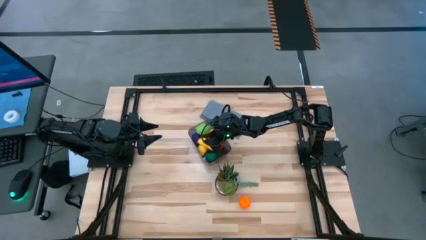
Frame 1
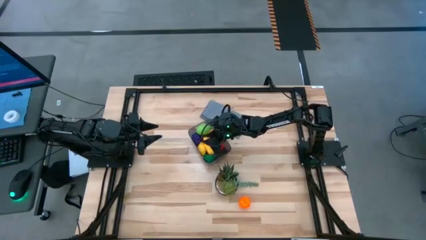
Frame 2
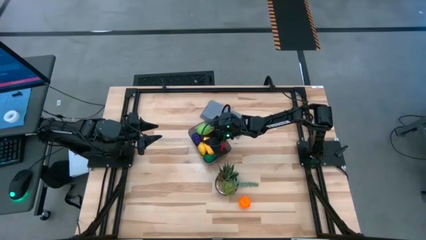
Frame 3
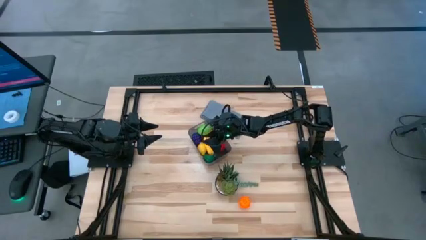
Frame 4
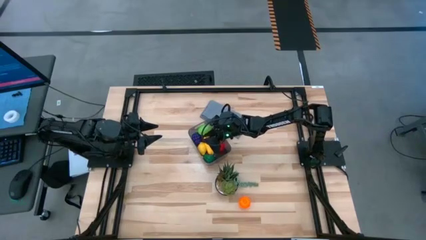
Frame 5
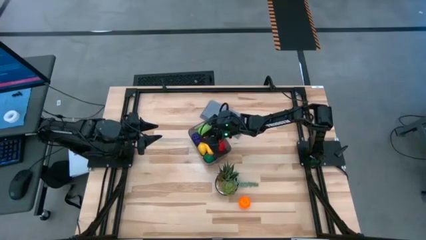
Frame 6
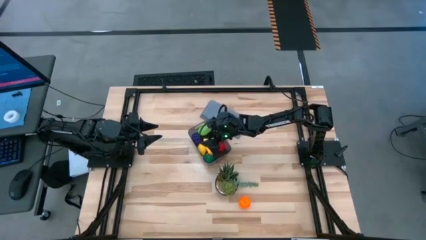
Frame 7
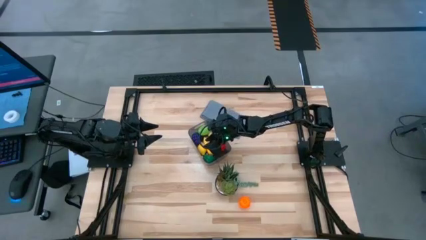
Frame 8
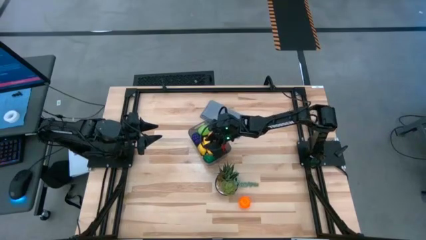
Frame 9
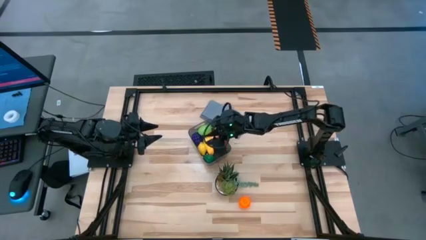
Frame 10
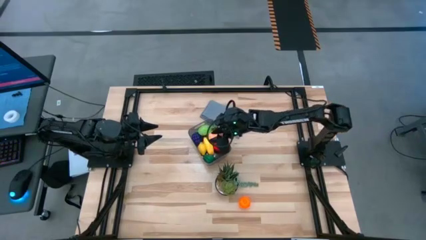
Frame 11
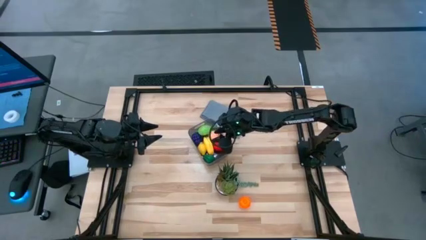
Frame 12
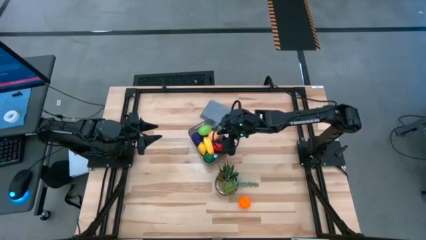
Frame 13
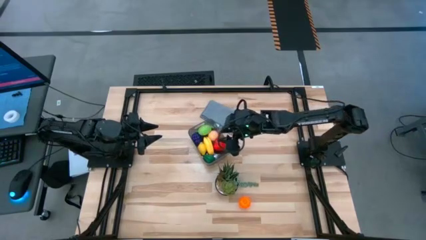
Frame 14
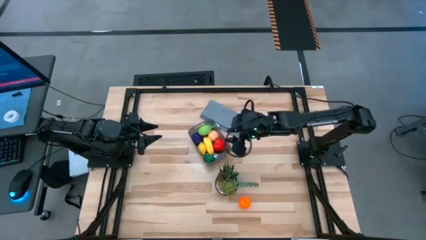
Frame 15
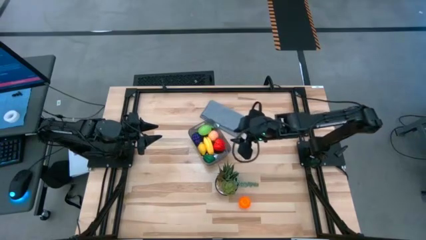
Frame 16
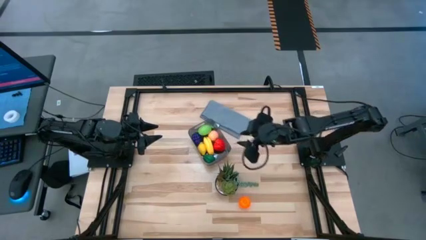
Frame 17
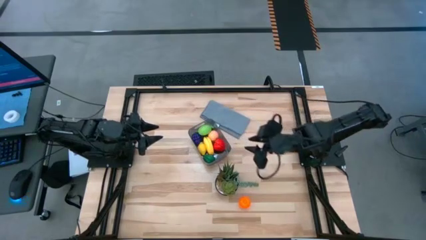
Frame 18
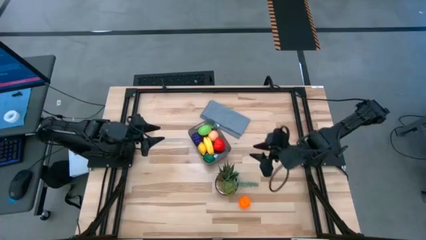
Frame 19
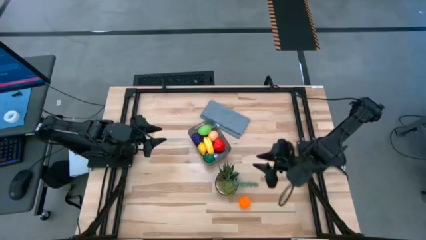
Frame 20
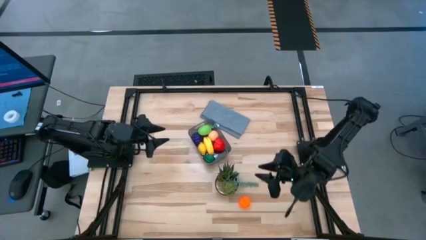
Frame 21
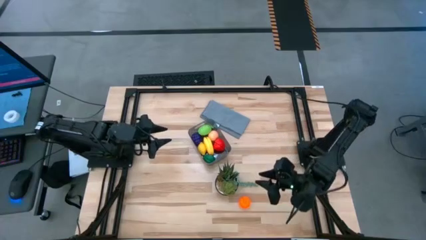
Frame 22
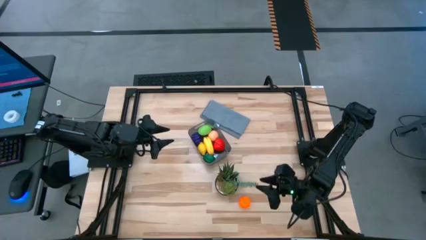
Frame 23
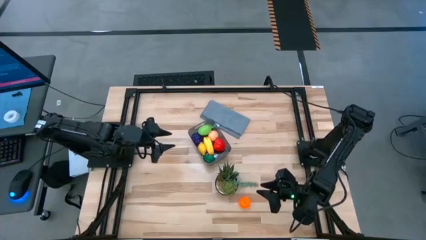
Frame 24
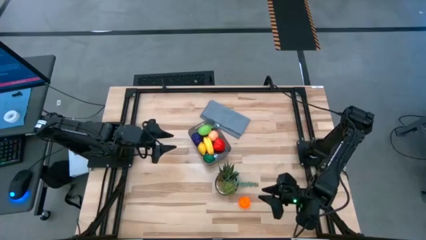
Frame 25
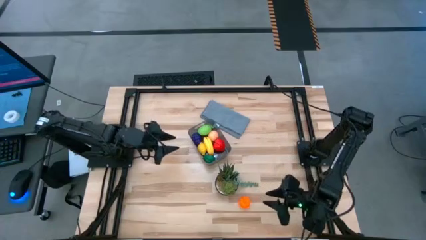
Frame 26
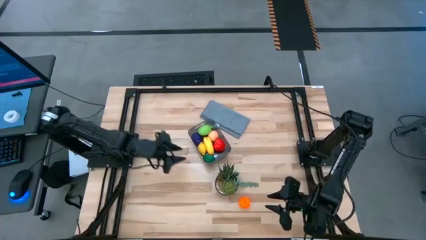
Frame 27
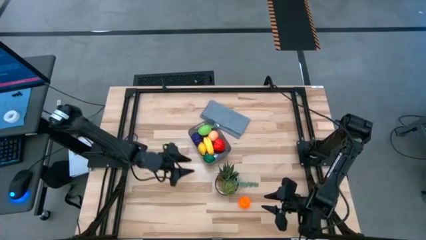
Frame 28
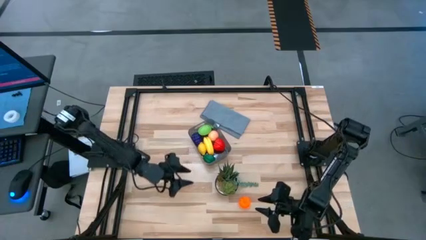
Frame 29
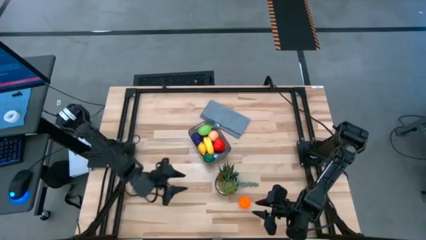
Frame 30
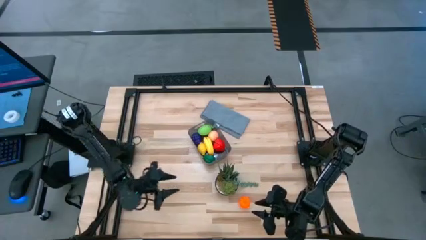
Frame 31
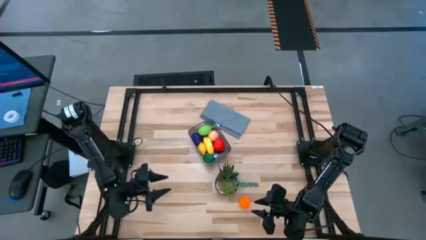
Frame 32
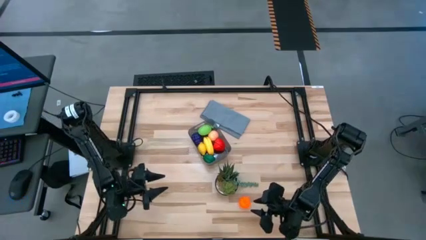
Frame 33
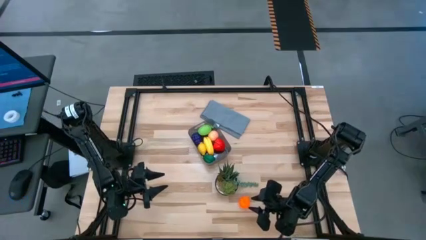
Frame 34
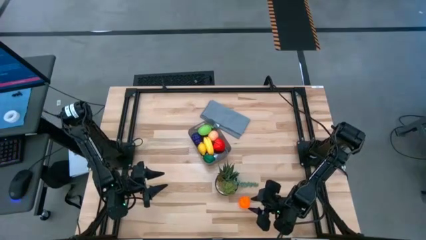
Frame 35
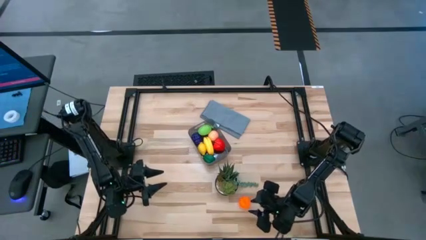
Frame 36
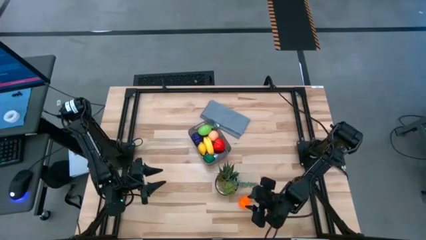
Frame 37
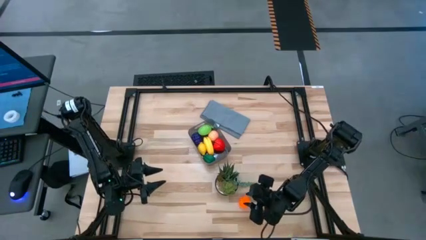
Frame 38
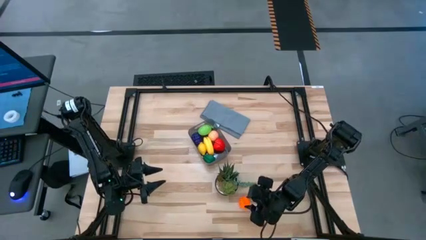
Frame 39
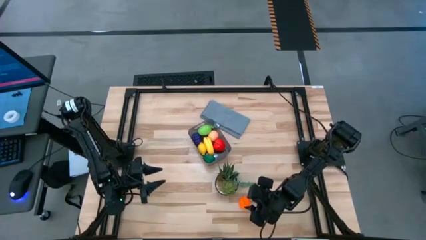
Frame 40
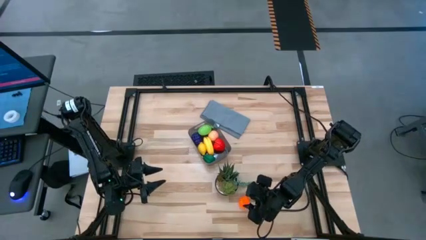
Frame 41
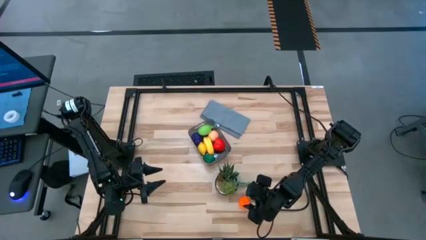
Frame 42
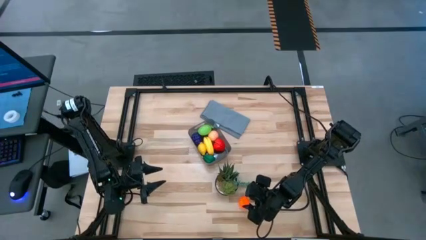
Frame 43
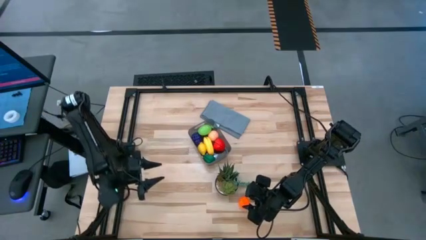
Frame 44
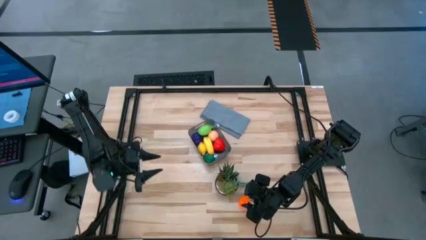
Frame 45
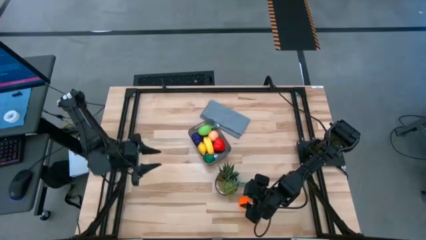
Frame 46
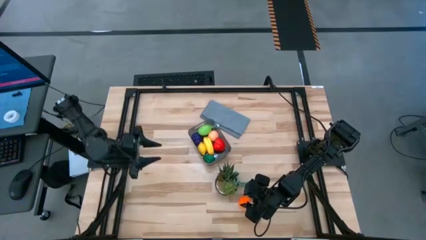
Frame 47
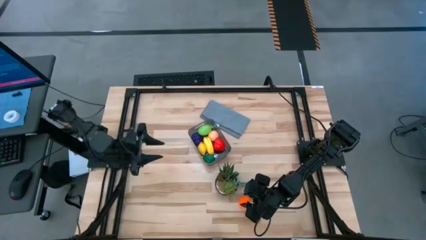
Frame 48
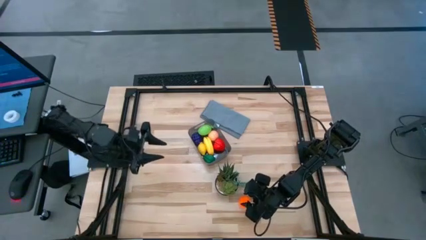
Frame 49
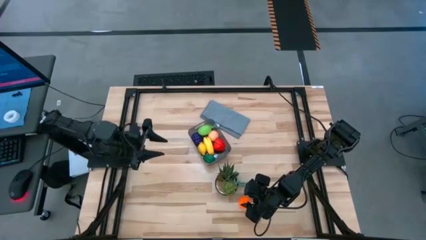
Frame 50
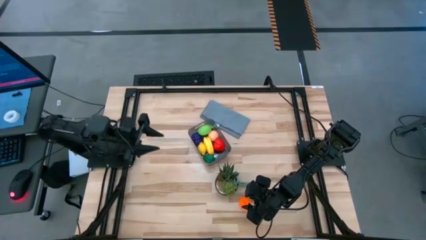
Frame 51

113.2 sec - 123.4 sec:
Task: Pick and placing Produce into tupperware
Put the orange pumpkin into the black bin

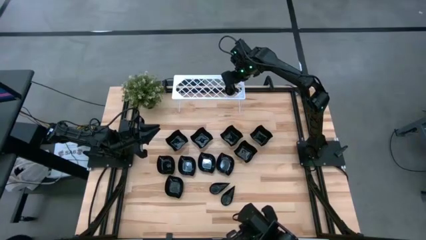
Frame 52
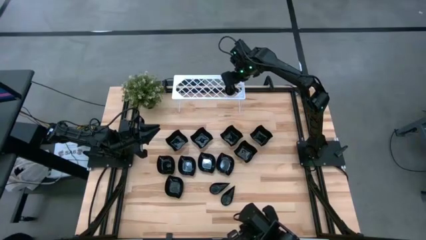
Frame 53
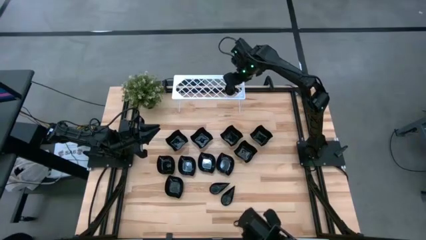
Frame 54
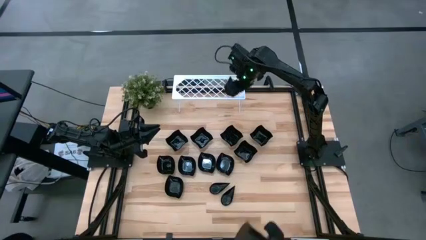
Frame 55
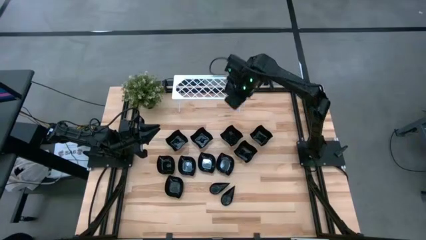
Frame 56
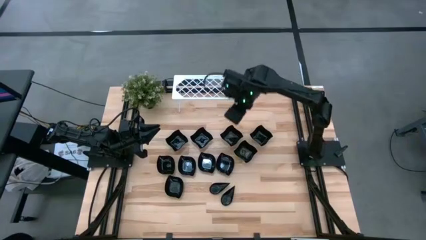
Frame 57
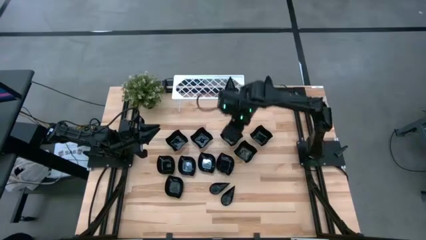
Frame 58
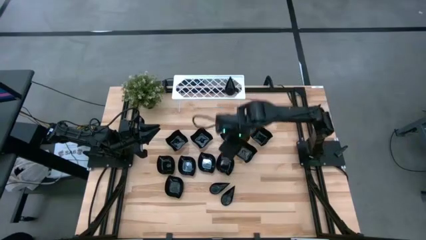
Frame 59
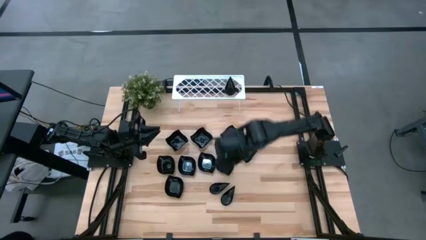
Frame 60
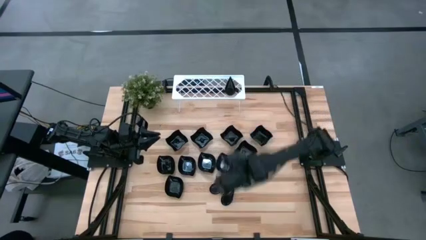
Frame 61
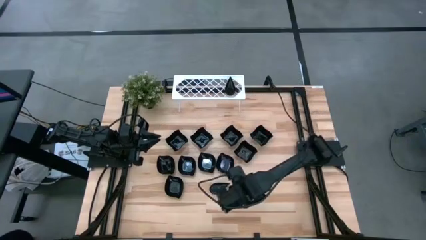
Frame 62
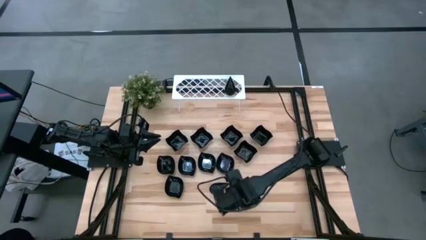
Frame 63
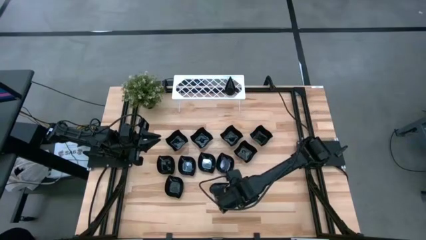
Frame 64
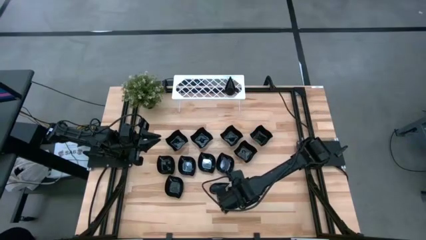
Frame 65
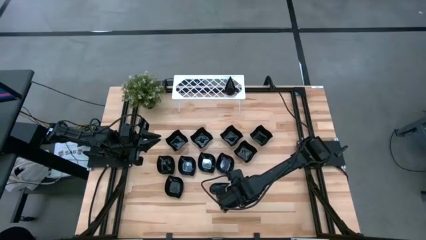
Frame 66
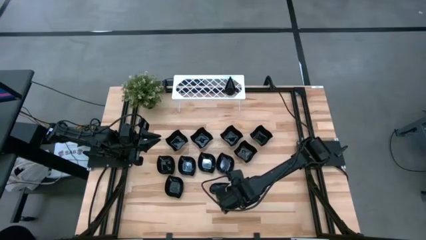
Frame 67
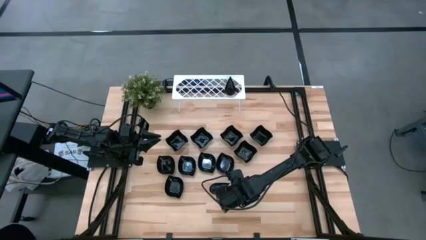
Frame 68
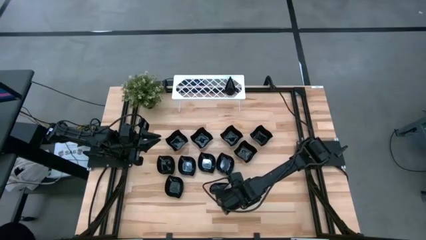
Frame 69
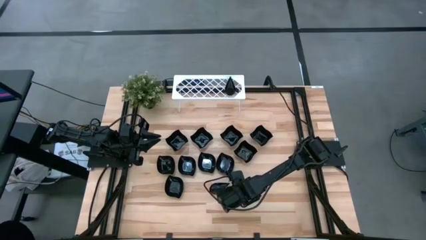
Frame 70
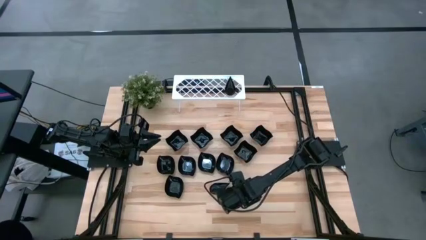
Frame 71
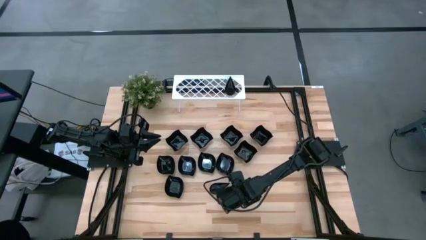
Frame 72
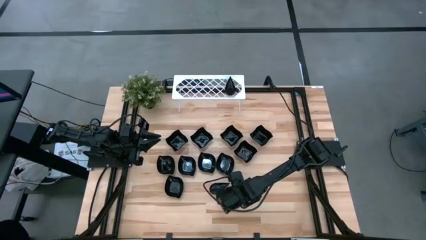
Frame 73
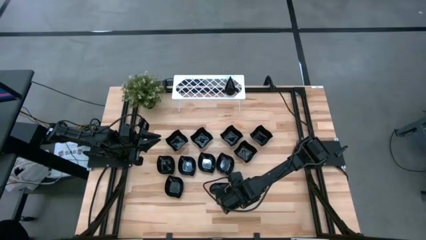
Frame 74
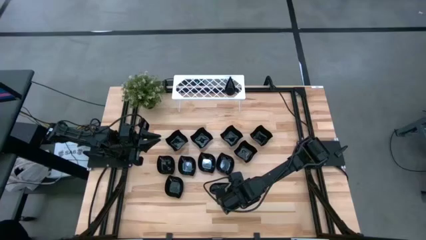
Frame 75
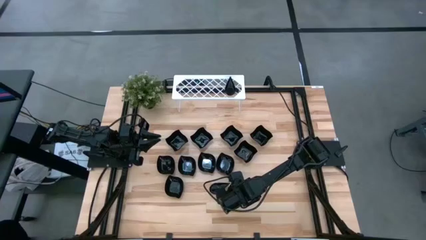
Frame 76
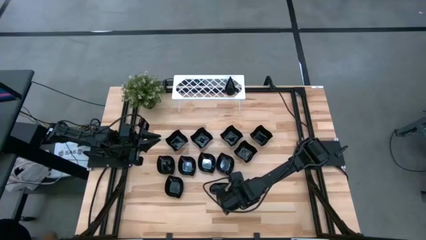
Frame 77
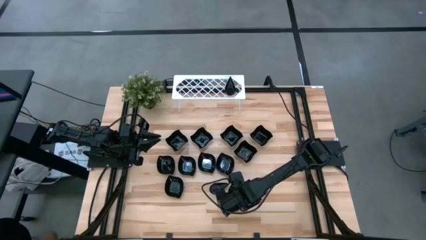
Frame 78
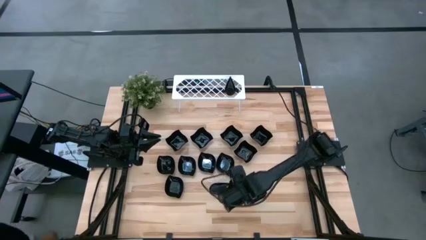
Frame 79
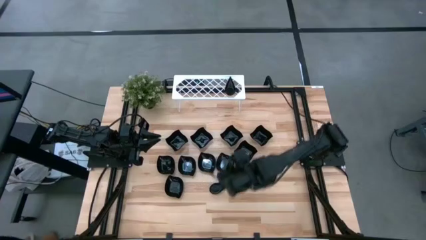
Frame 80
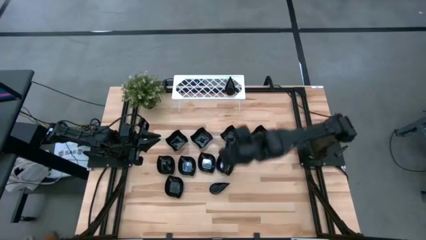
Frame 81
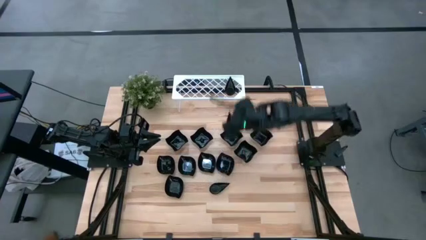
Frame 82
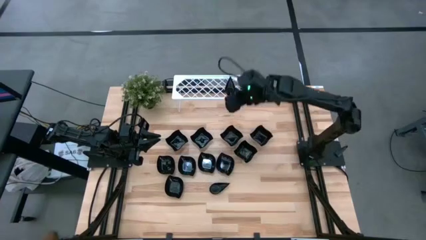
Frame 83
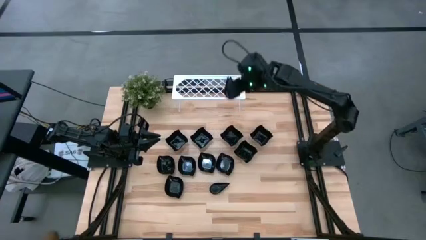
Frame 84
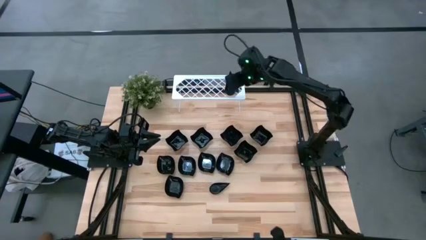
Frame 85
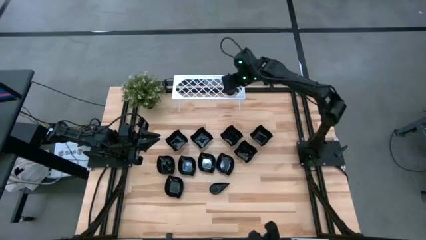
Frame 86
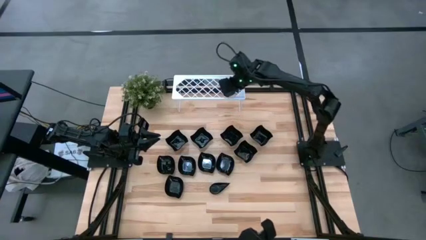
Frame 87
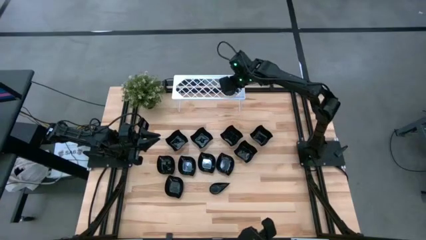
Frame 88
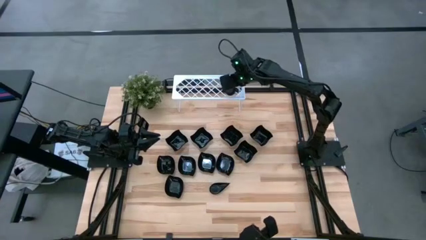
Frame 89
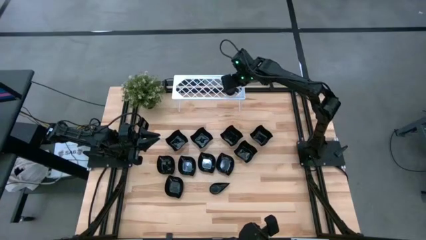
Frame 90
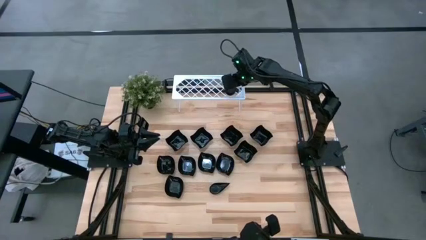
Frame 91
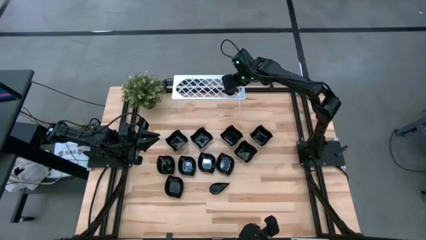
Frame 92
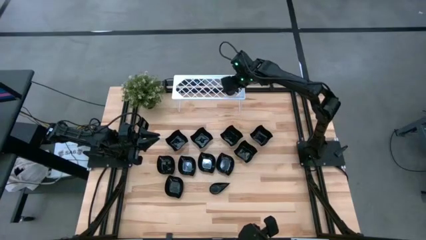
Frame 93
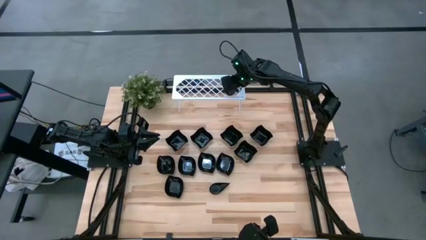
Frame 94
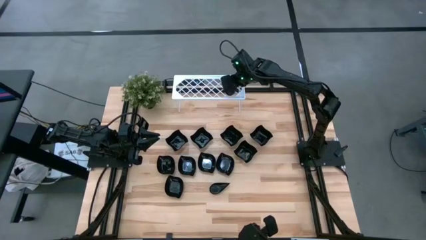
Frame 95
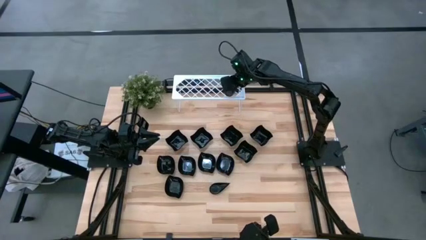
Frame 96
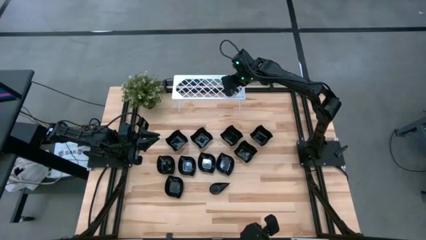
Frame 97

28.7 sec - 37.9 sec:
Task: Pick & Place Mini shaped plates
Stack the drop-shaped plate on top of the drop-shaped plate on the shelf
